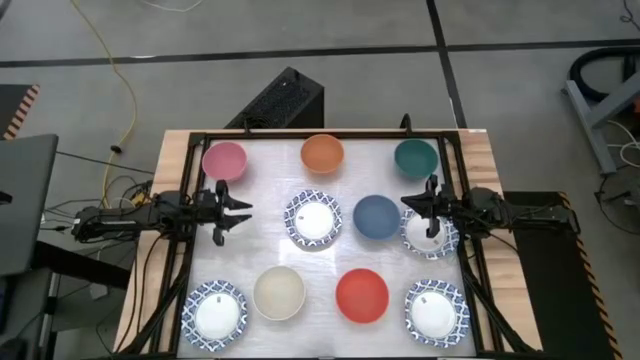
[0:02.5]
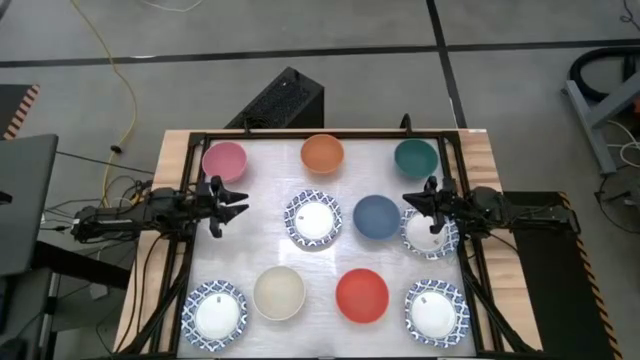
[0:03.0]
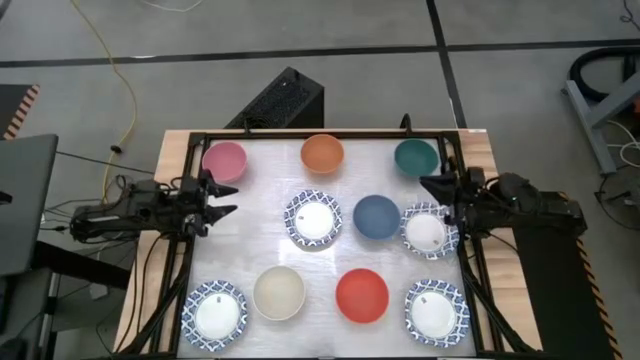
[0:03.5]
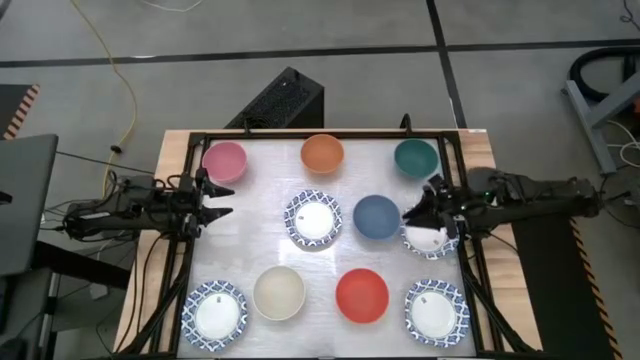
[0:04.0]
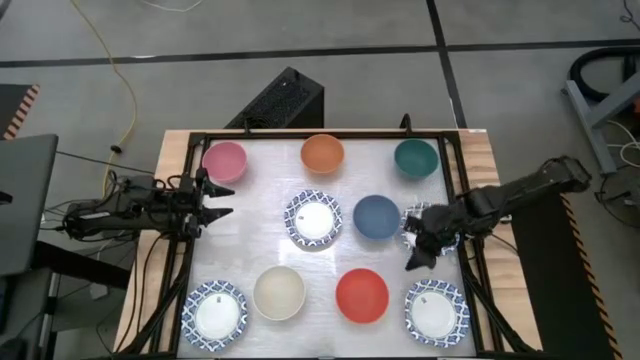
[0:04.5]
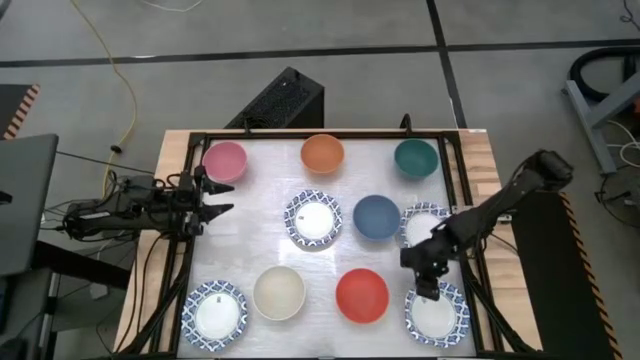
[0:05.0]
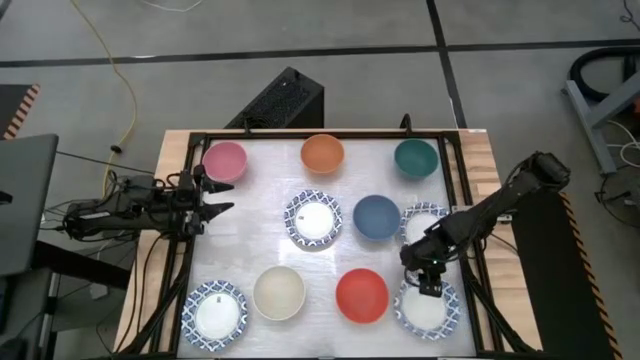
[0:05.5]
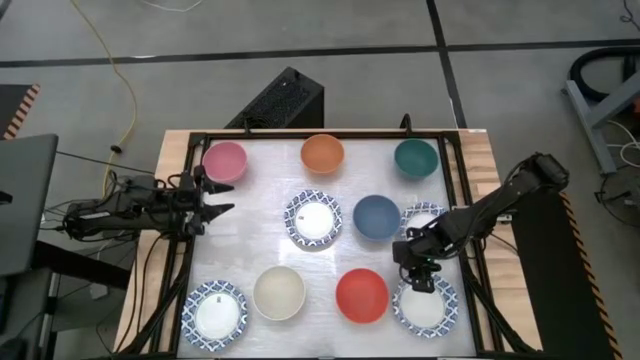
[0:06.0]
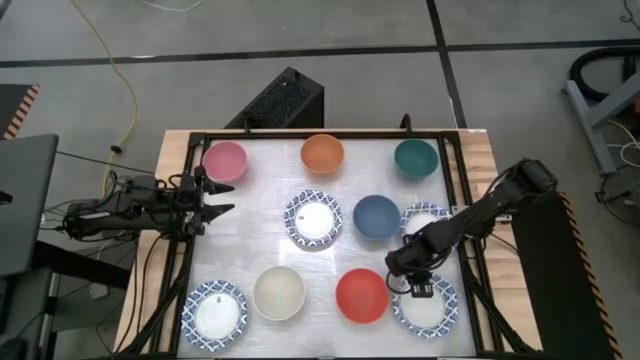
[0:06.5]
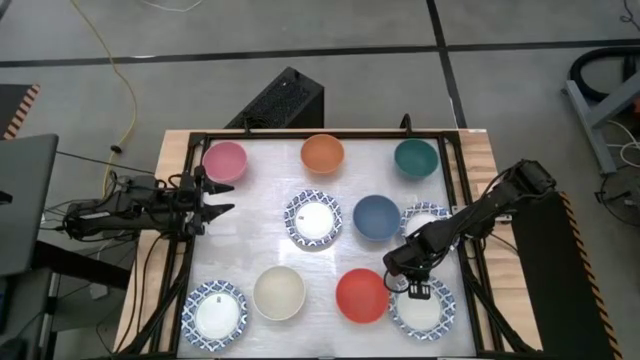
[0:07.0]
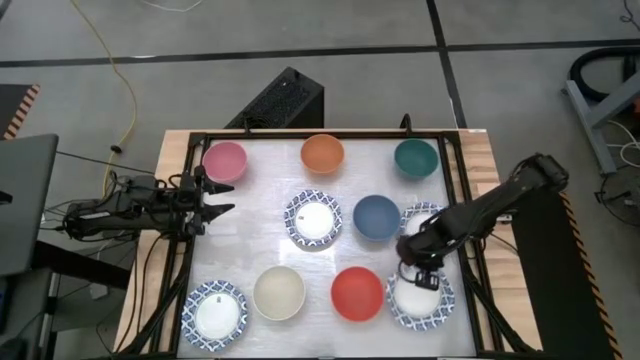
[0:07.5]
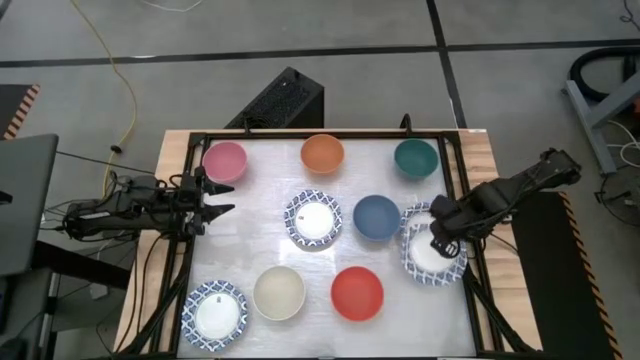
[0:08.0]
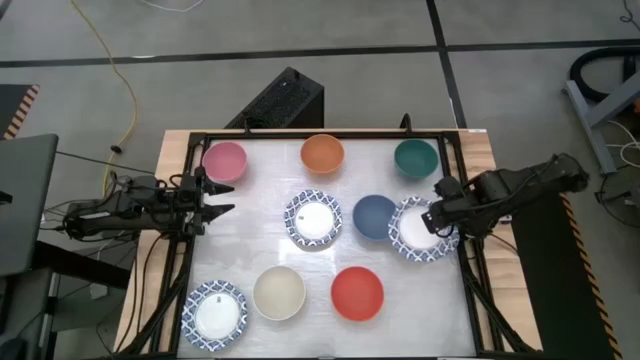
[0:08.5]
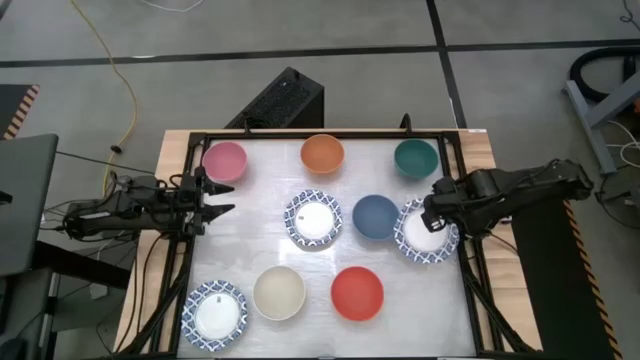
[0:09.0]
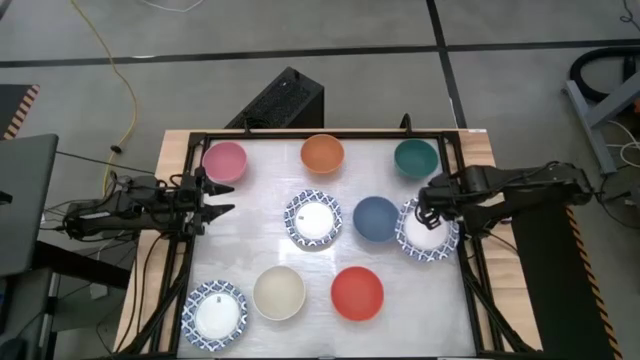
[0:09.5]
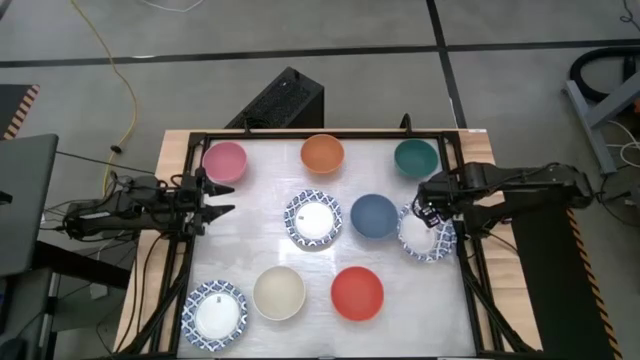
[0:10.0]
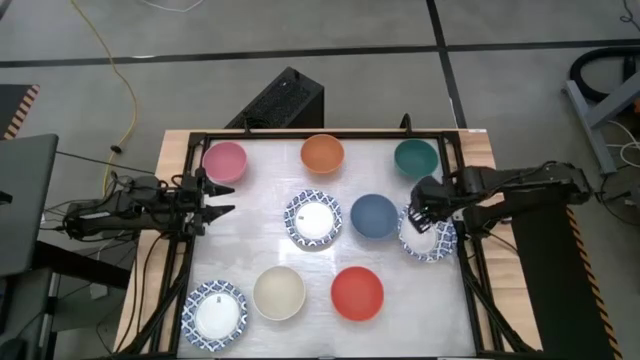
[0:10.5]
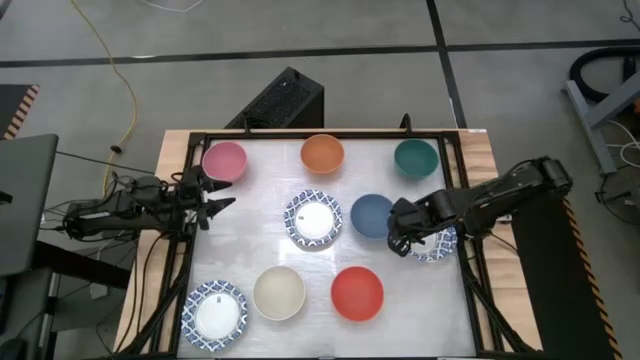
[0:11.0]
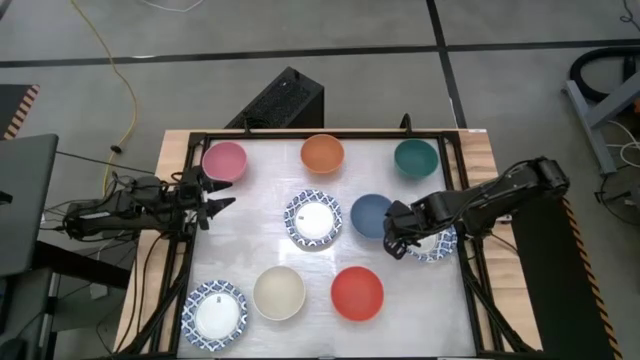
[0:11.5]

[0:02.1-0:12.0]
Stack the bottom right white patterned plate on top of the top right white patterned plate

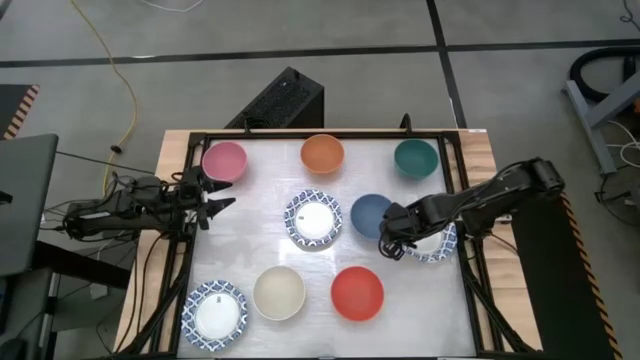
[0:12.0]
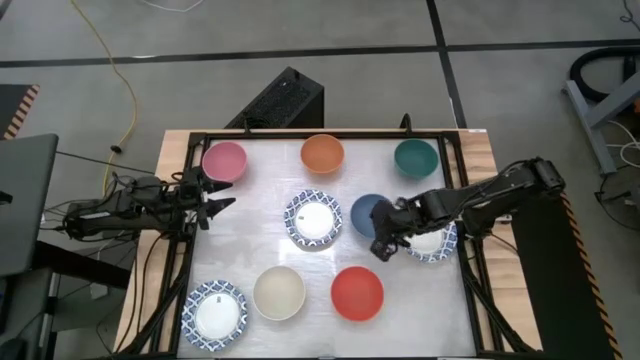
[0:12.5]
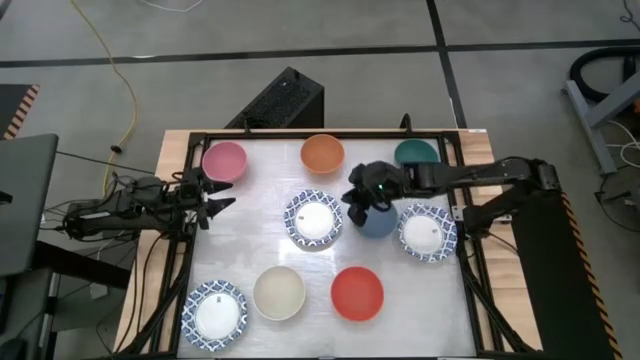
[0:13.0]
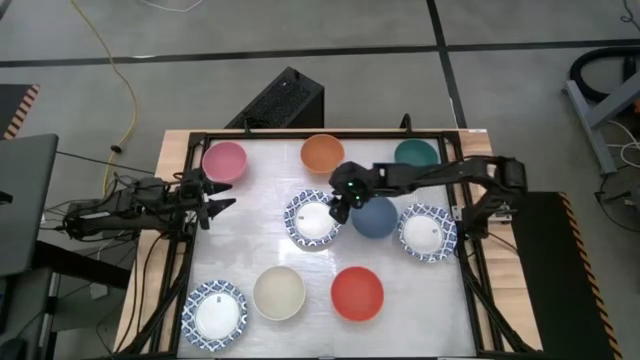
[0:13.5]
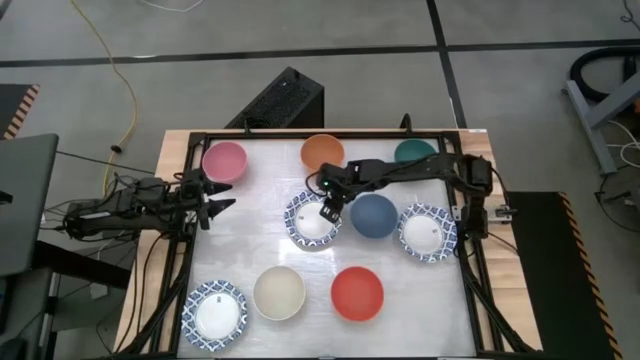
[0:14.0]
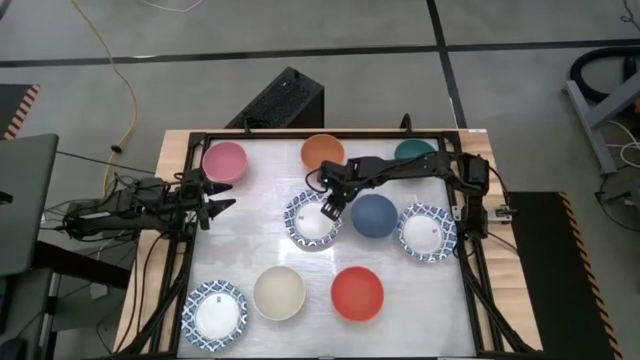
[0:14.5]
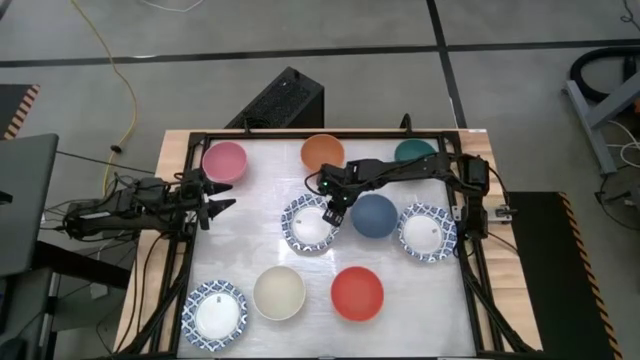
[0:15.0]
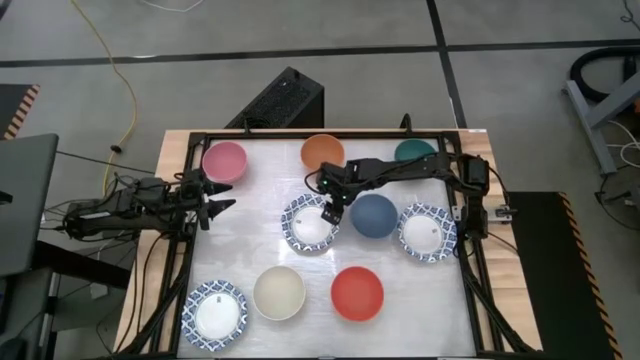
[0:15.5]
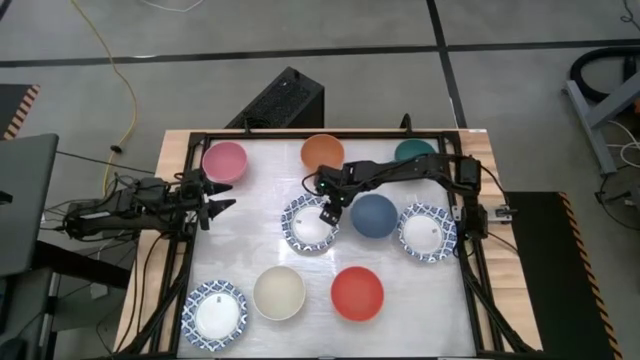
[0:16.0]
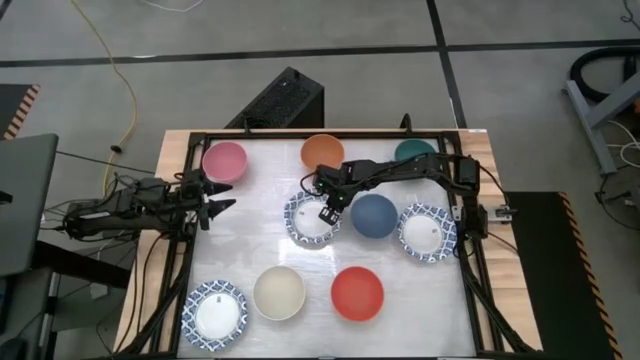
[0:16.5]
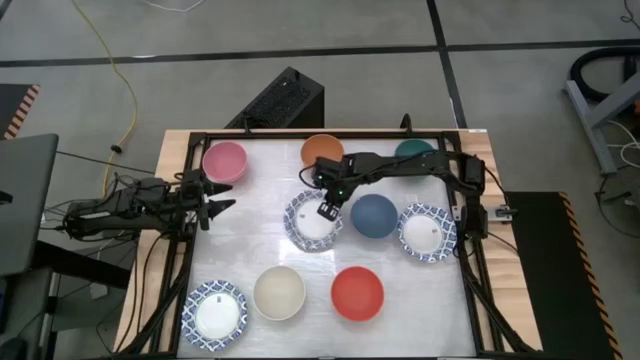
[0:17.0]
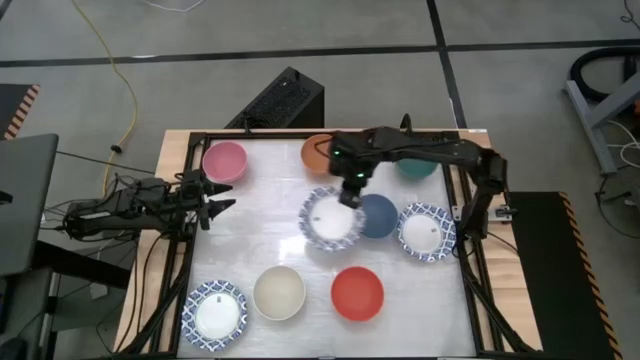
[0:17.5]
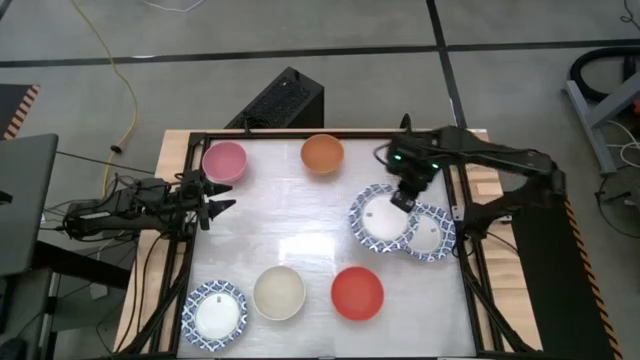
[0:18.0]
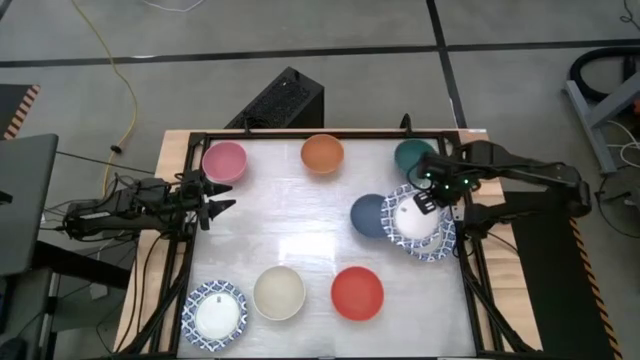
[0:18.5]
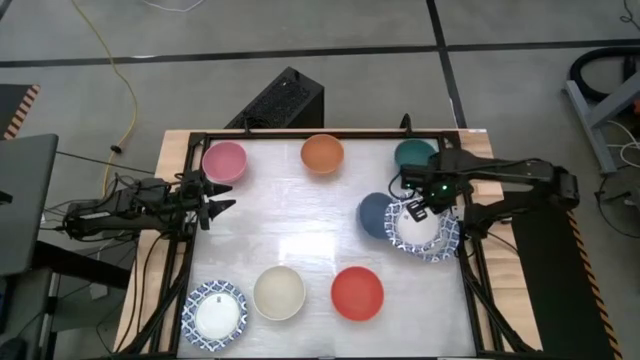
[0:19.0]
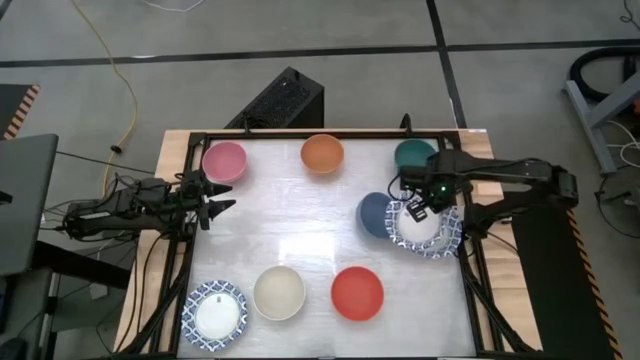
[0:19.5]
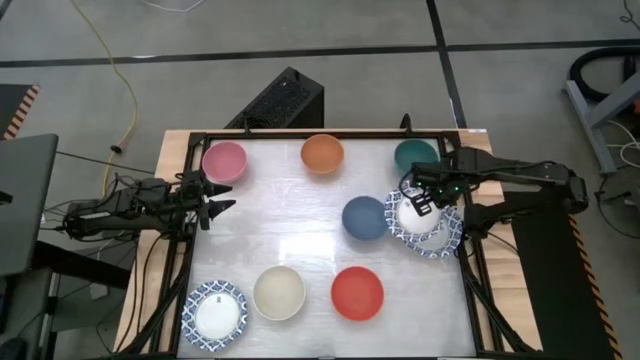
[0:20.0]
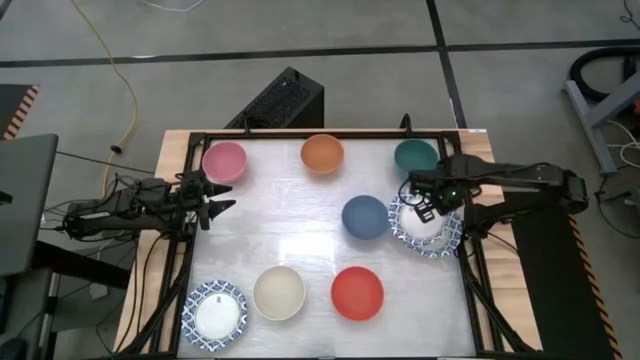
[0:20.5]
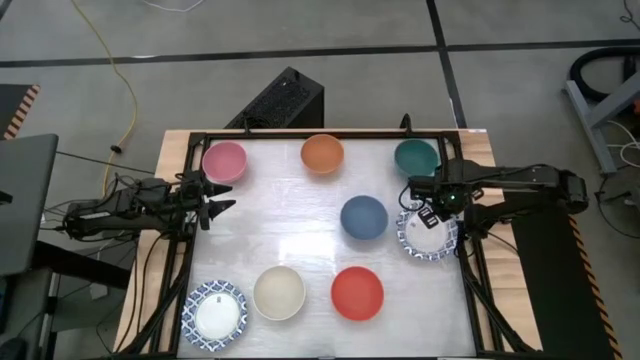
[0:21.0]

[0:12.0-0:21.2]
Stack the top left white patterned plate on top of the stacked white patterned plates
